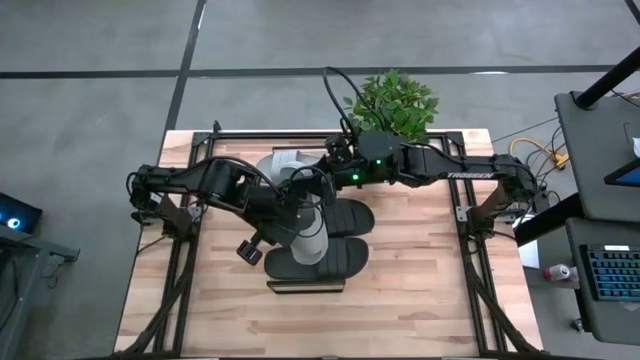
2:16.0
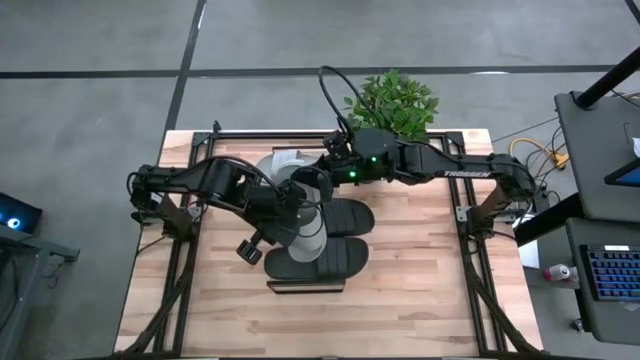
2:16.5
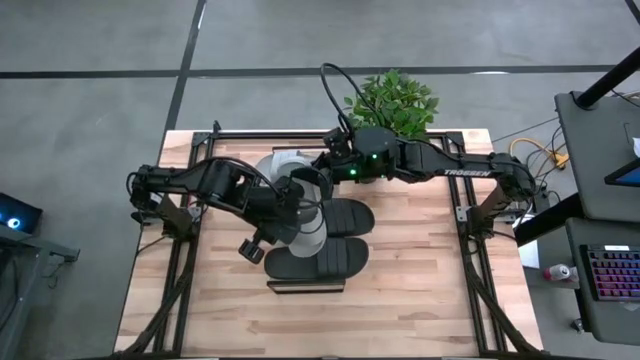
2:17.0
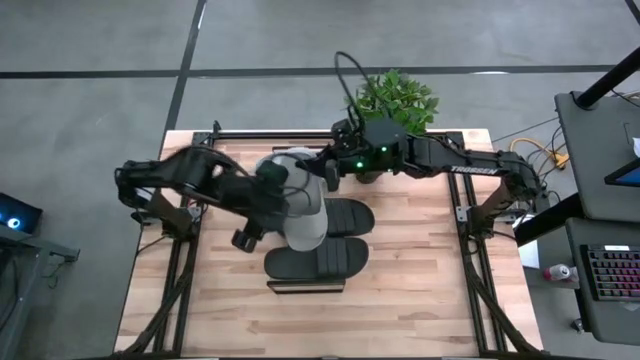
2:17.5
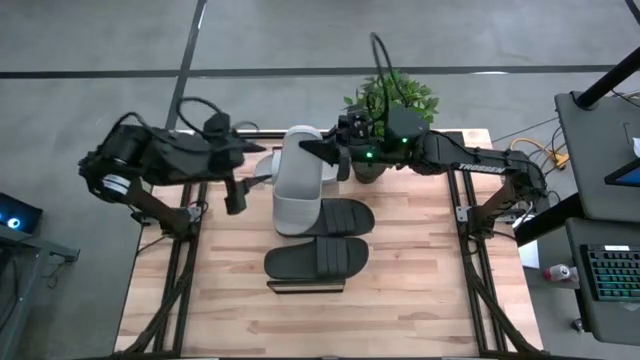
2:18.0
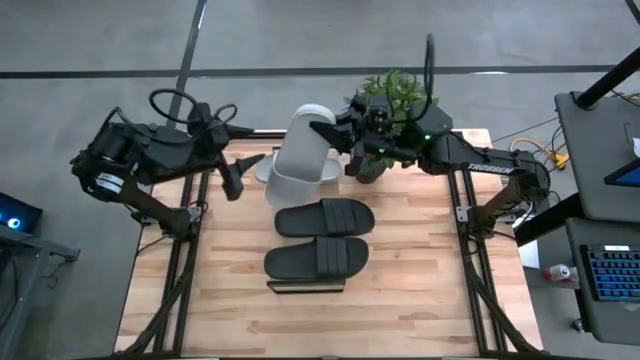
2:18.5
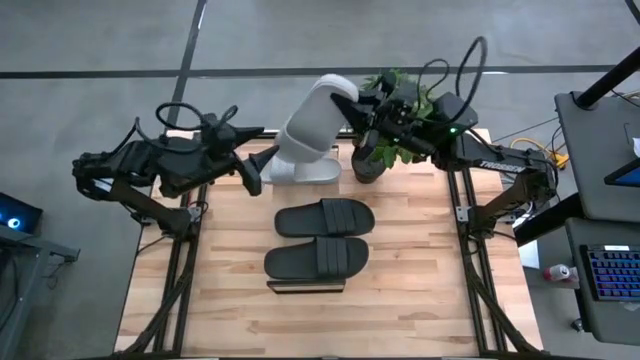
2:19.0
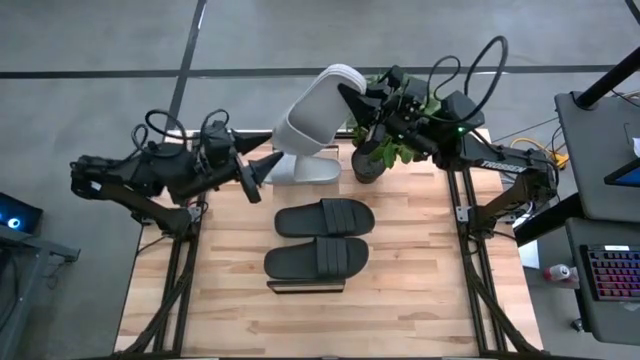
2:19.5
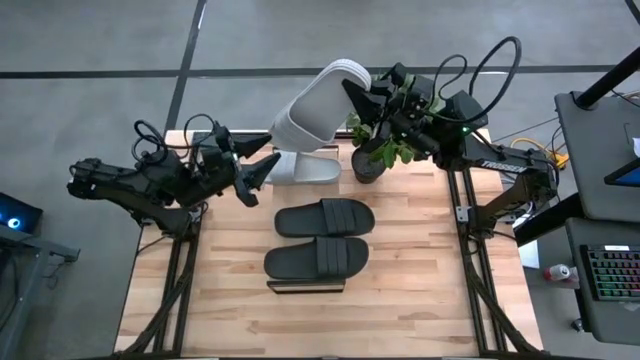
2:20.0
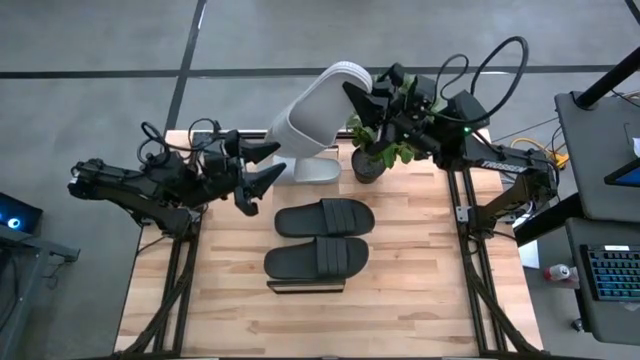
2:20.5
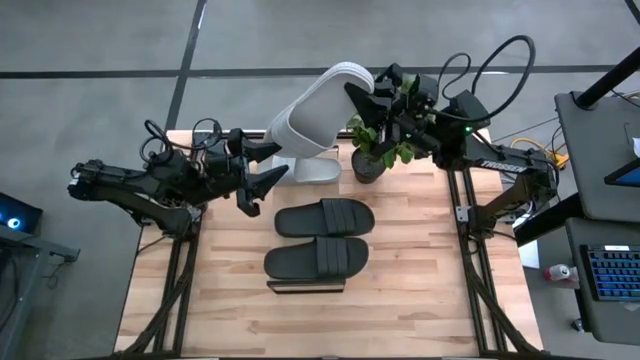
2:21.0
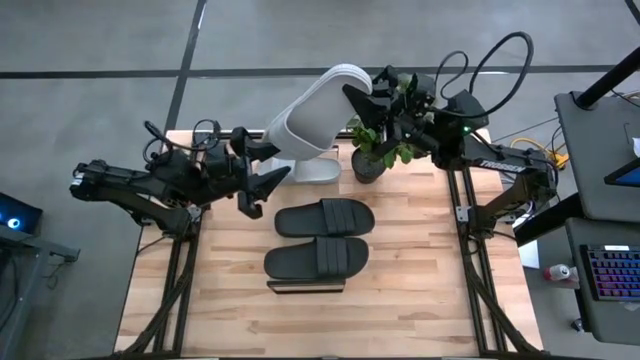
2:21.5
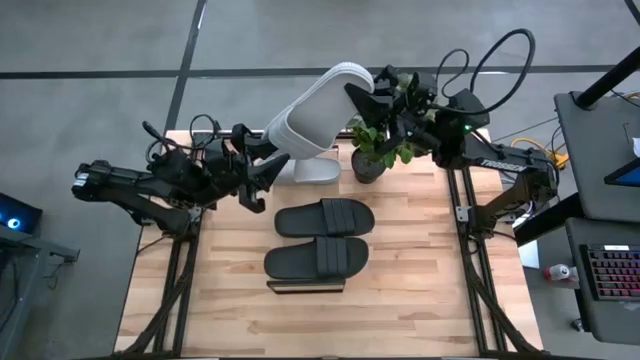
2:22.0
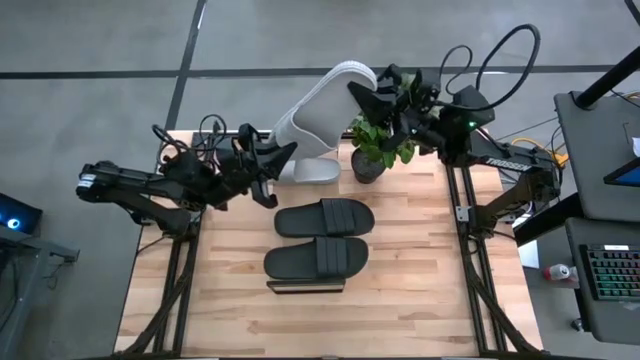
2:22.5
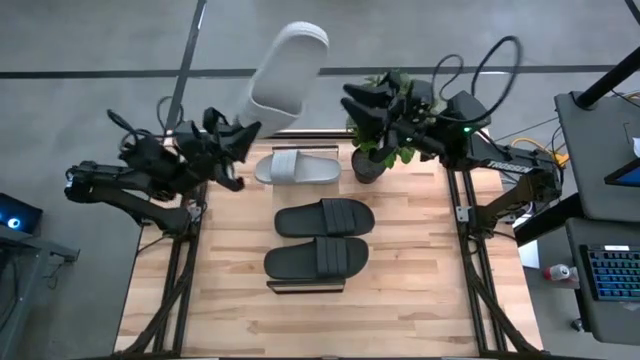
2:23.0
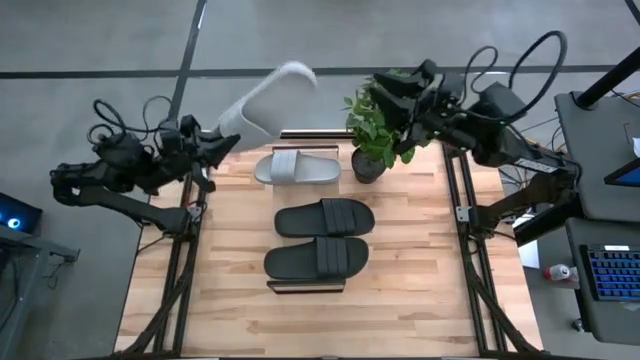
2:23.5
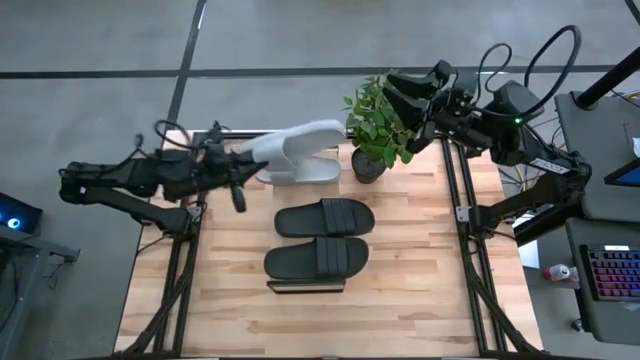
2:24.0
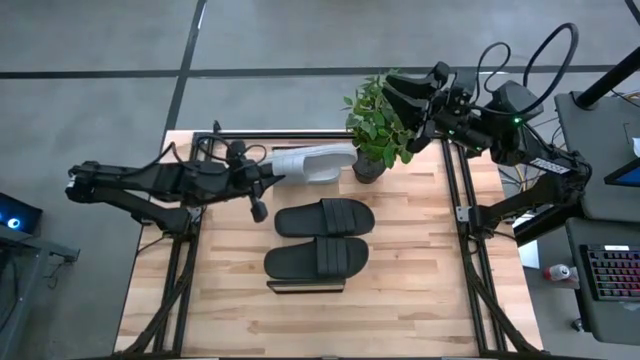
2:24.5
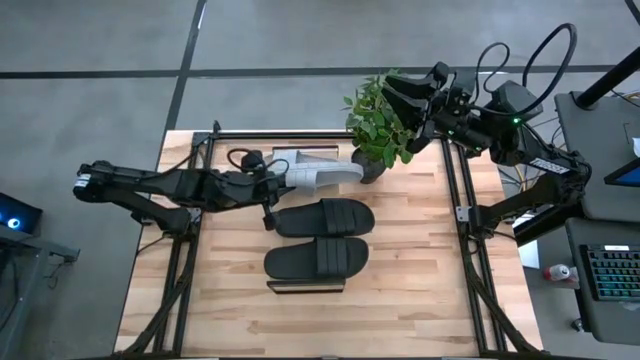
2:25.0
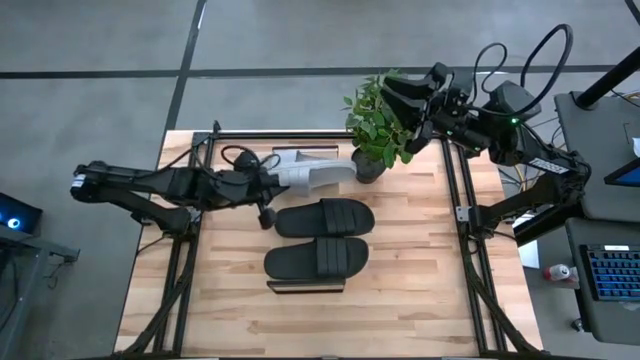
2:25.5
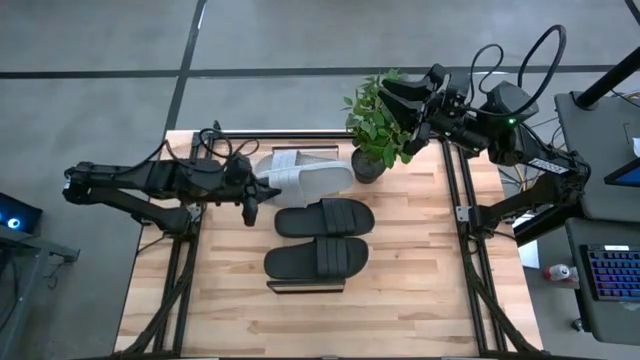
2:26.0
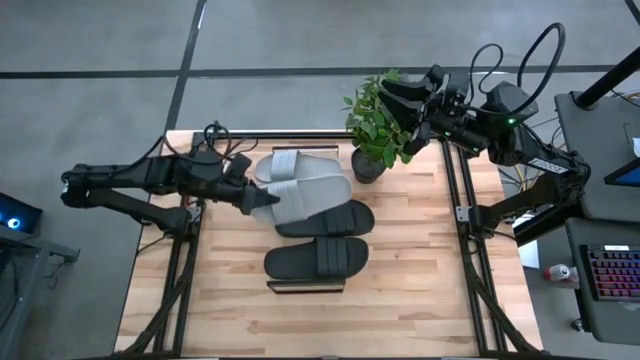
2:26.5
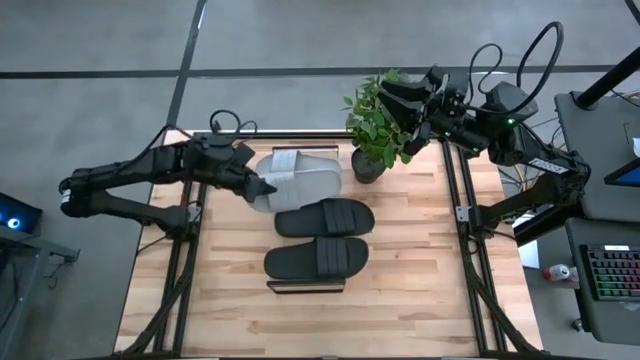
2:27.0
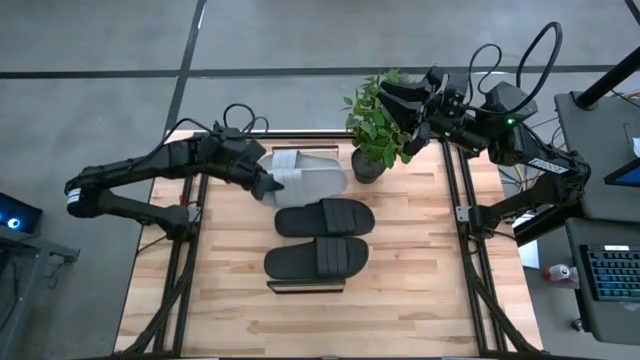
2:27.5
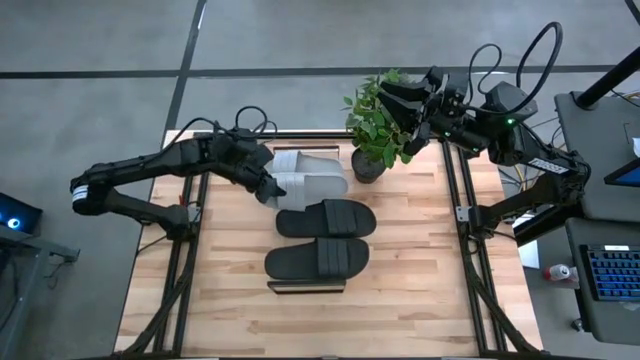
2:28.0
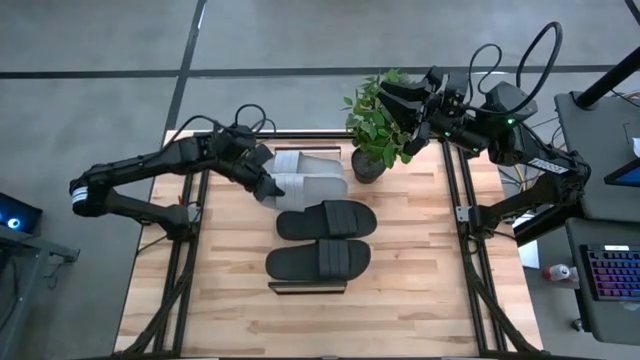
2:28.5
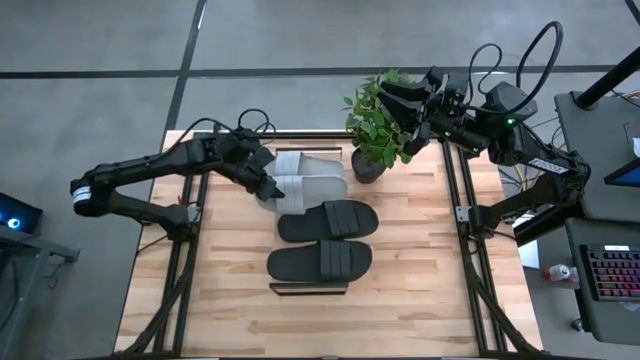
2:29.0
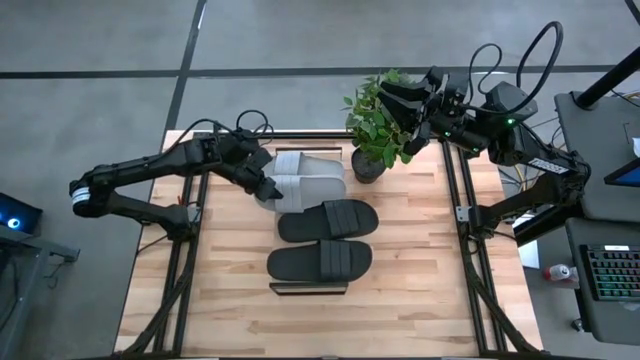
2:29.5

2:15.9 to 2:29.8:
Task: Pick and place slides into the shelf
Put the gray slipper on the shelf

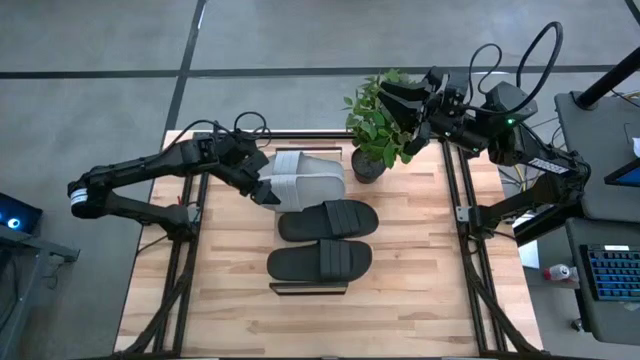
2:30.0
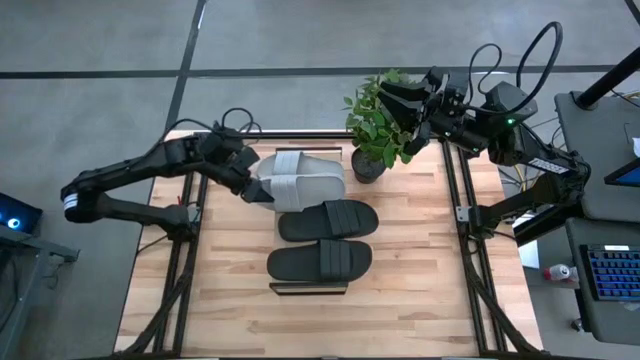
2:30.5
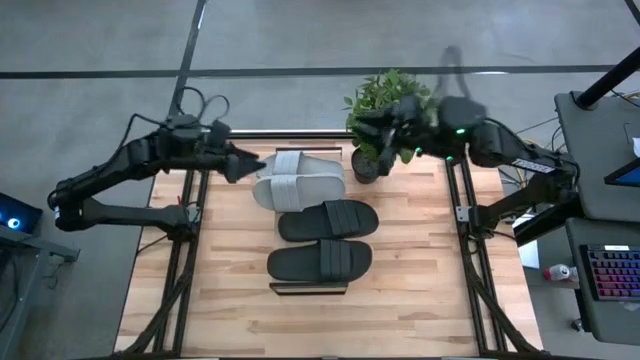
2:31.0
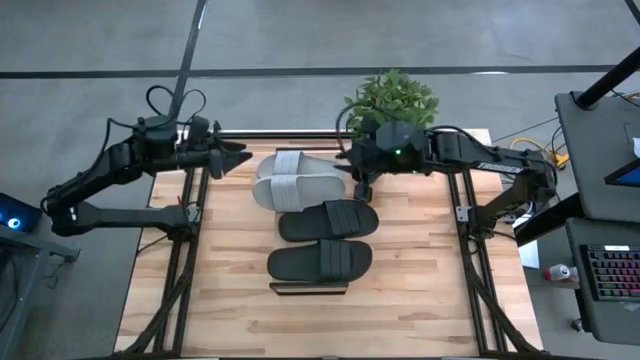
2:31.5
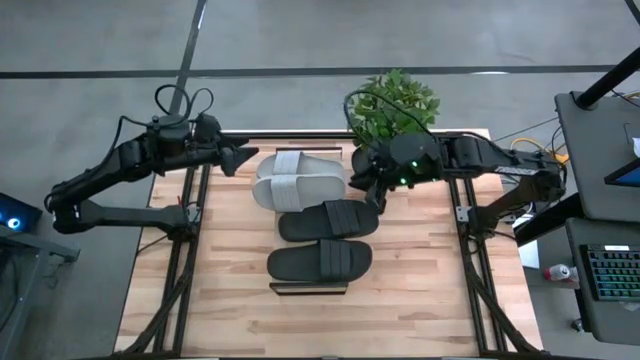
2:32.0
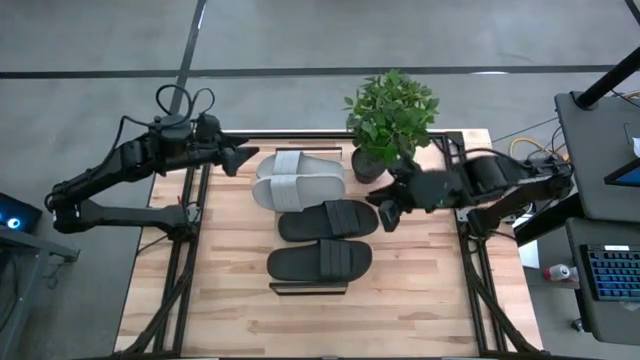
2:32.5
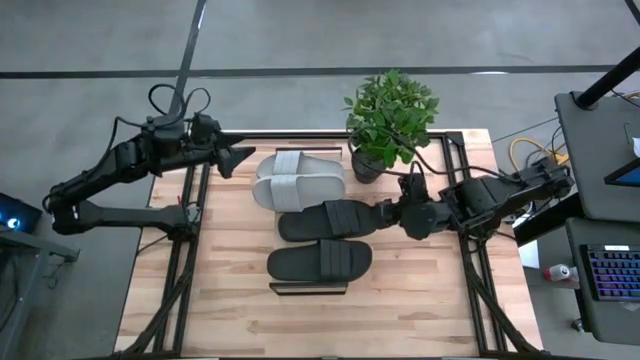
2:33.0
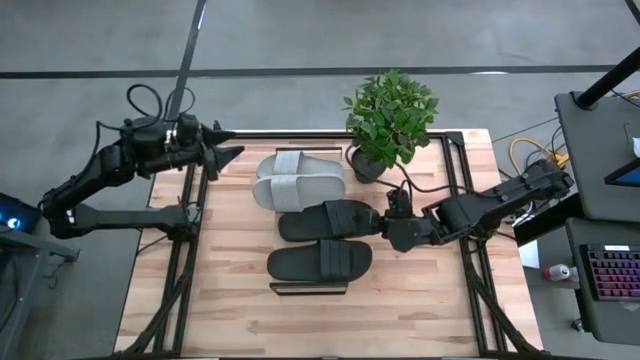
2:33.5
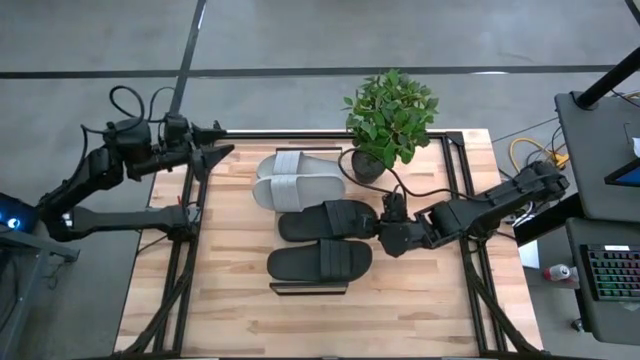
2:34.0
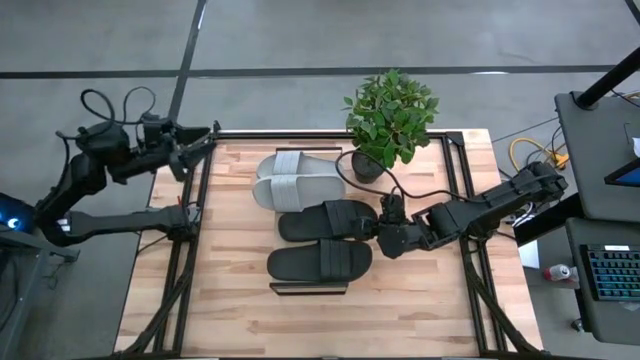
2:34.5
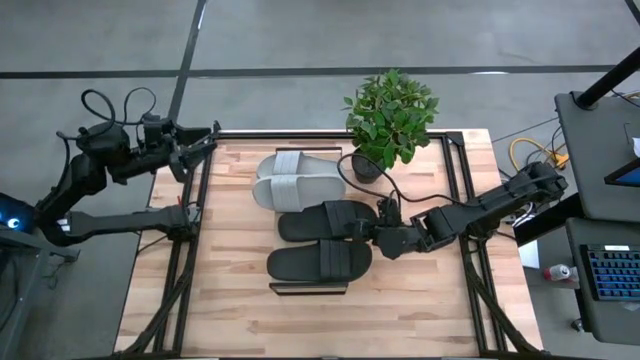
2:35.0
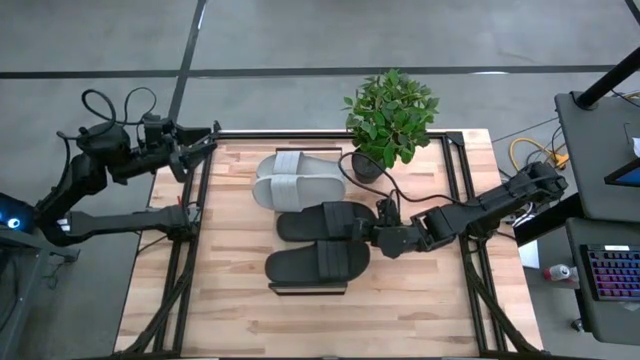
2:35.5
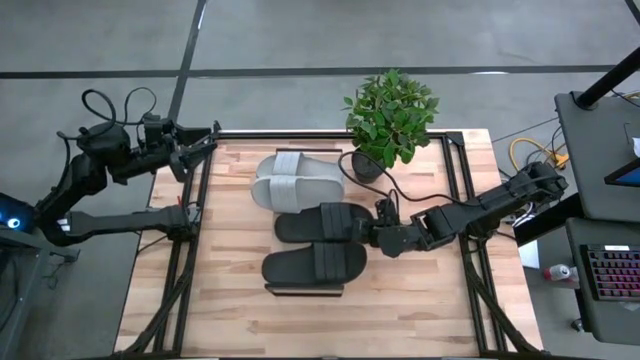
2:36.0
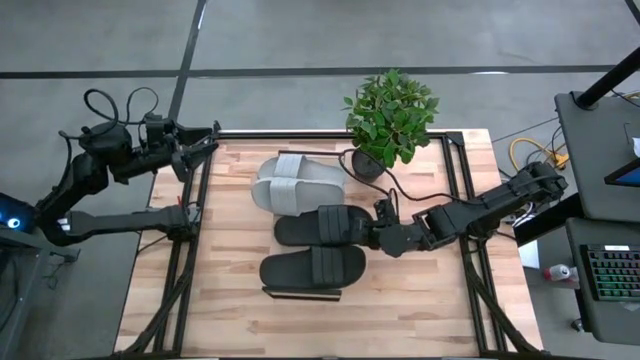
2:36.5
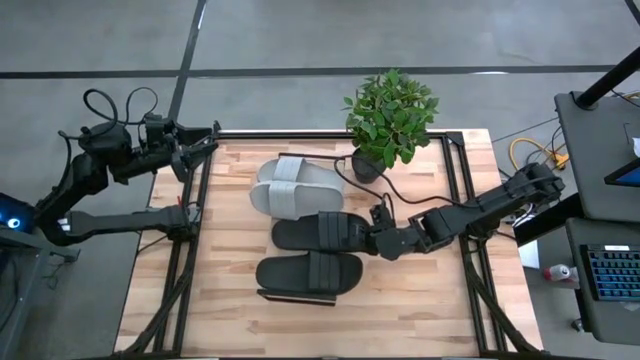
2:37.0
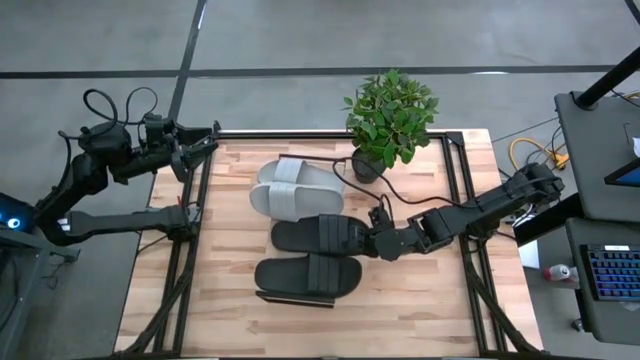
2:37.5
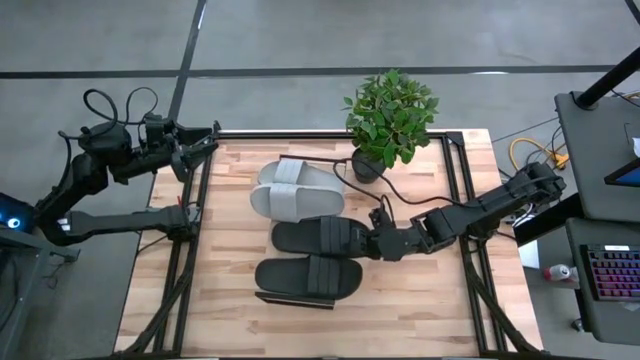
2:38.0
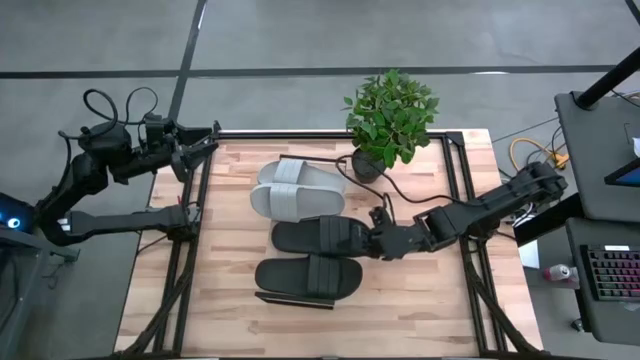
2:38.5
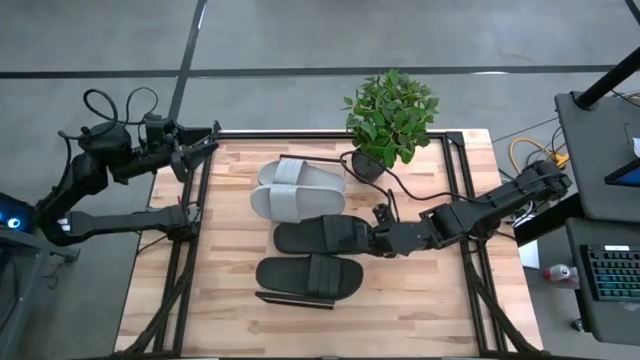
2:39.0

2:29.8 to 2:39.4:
Adjust the black slipper
